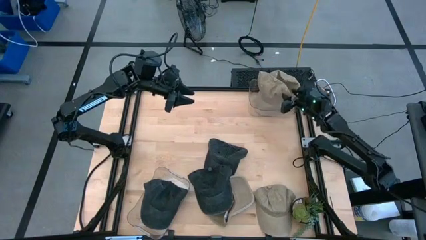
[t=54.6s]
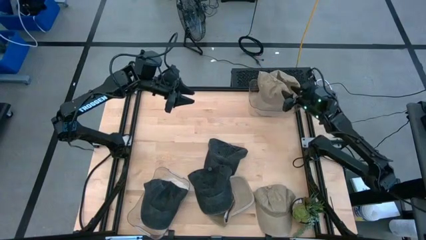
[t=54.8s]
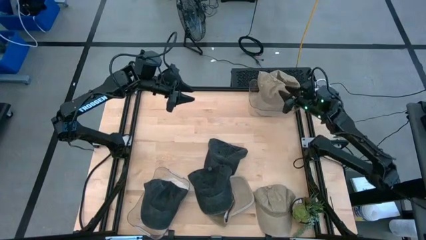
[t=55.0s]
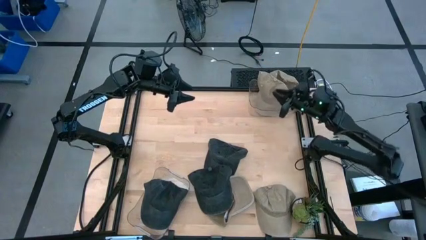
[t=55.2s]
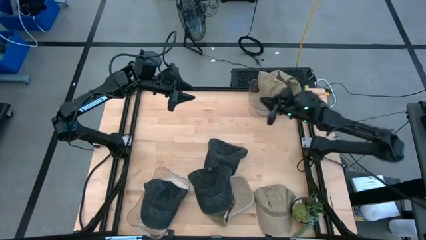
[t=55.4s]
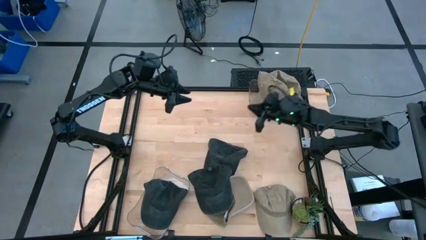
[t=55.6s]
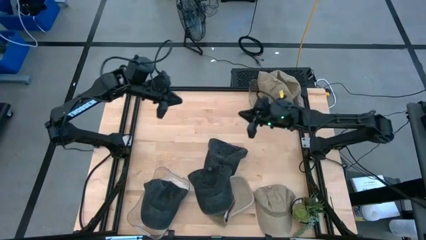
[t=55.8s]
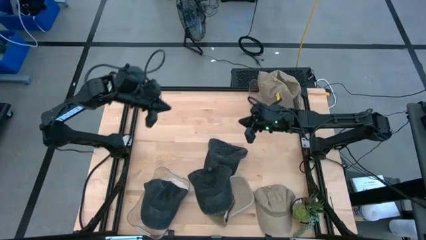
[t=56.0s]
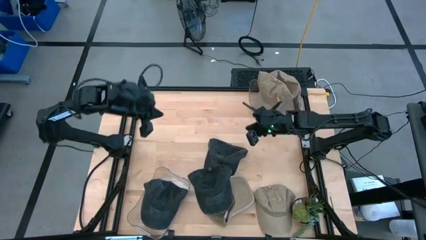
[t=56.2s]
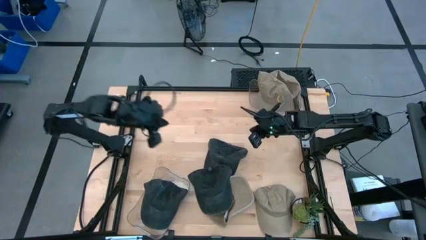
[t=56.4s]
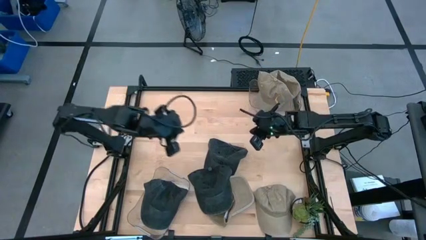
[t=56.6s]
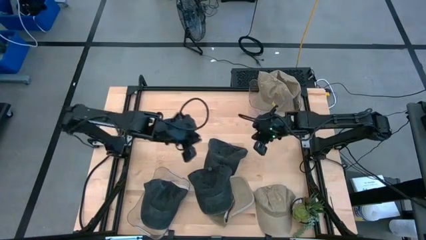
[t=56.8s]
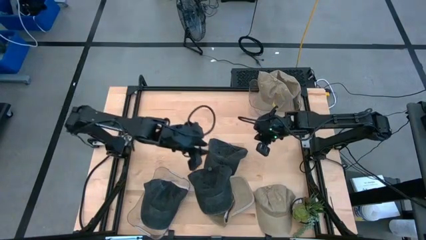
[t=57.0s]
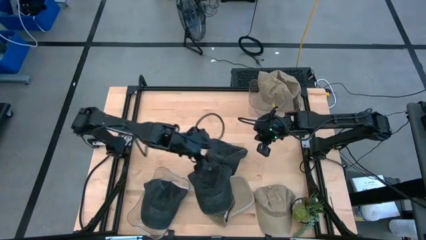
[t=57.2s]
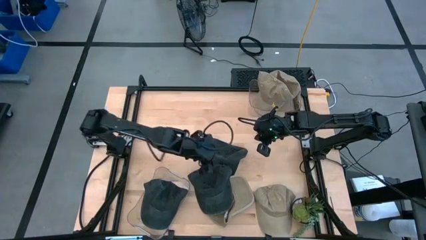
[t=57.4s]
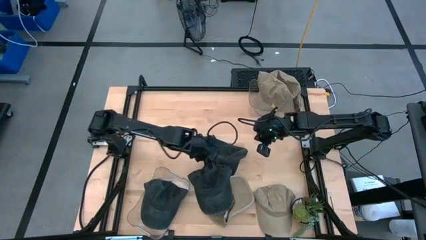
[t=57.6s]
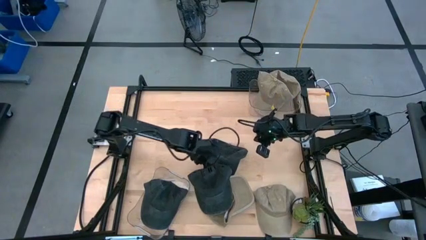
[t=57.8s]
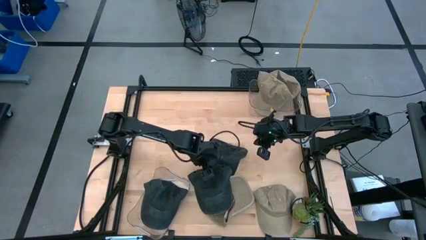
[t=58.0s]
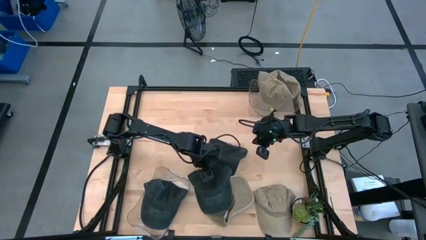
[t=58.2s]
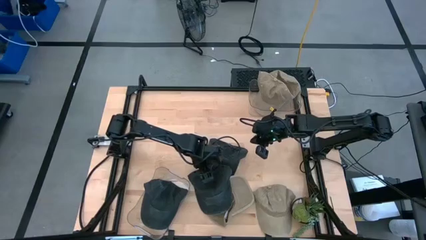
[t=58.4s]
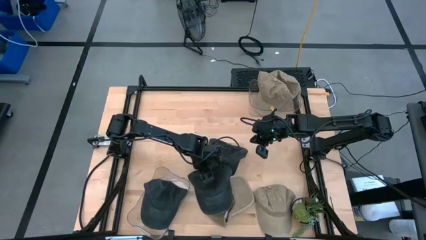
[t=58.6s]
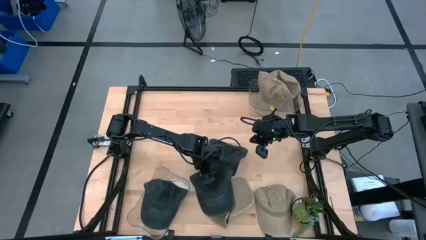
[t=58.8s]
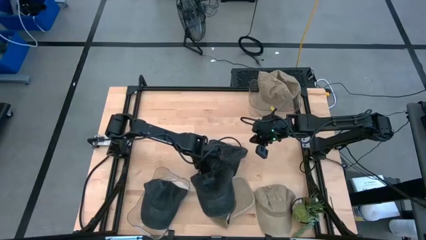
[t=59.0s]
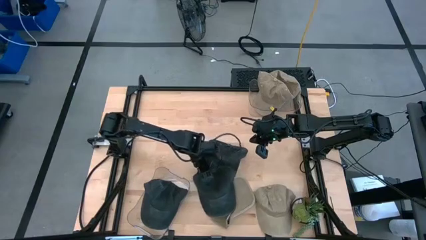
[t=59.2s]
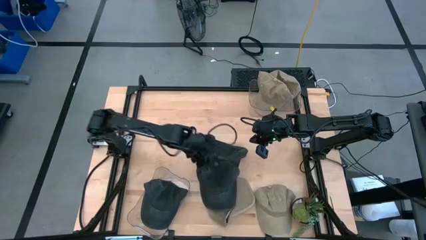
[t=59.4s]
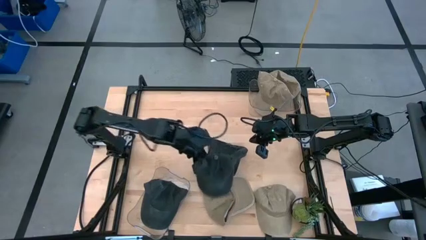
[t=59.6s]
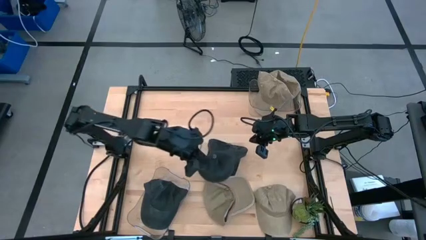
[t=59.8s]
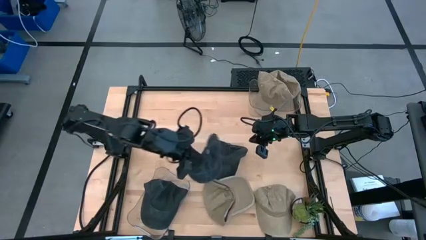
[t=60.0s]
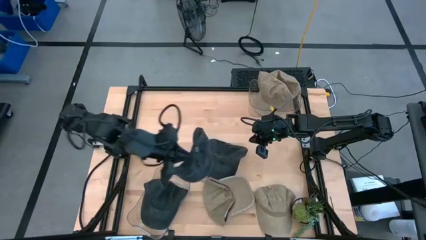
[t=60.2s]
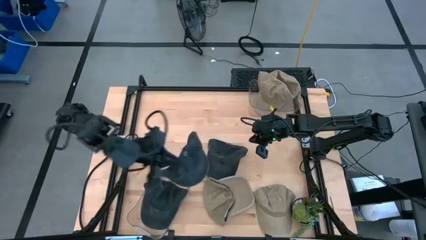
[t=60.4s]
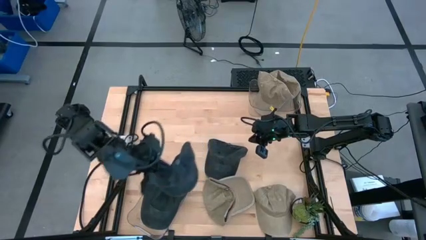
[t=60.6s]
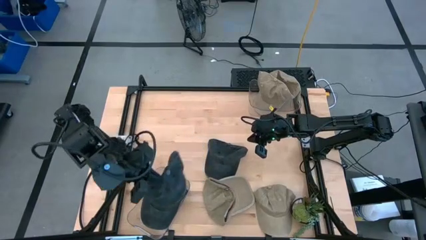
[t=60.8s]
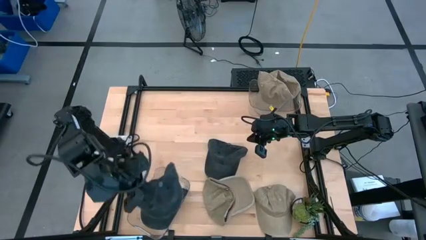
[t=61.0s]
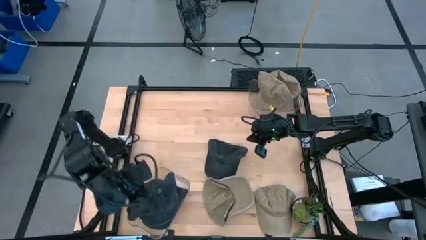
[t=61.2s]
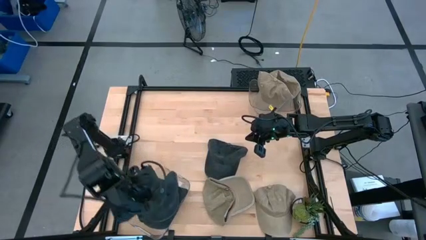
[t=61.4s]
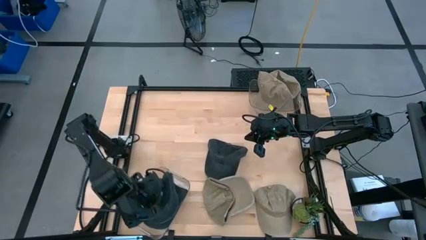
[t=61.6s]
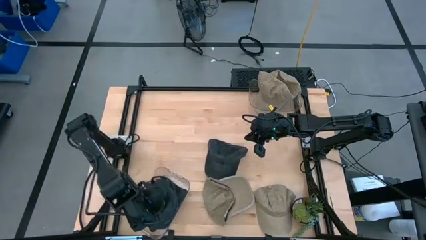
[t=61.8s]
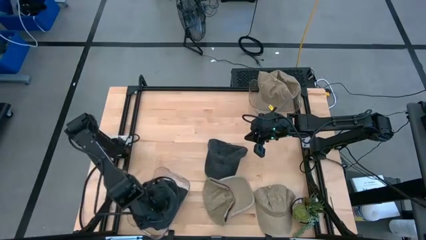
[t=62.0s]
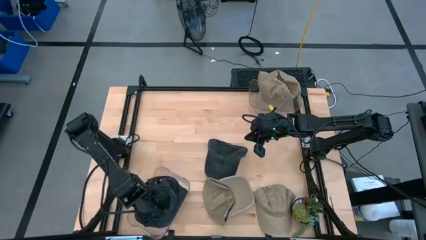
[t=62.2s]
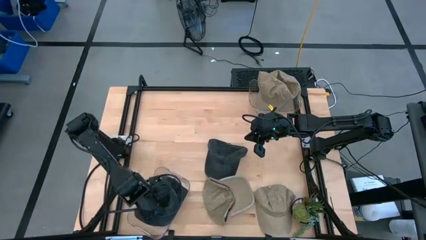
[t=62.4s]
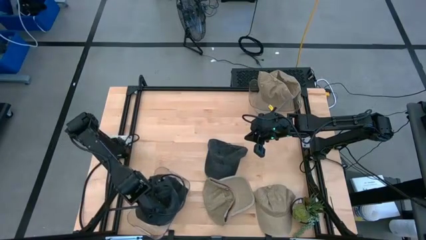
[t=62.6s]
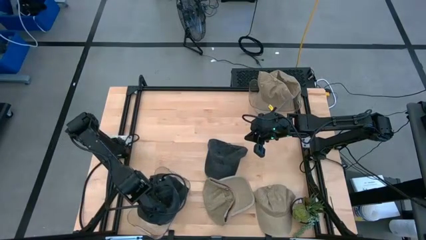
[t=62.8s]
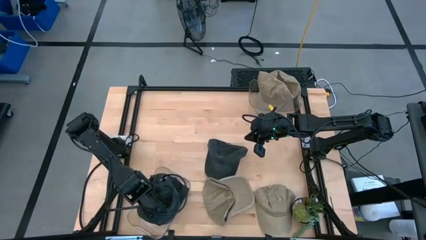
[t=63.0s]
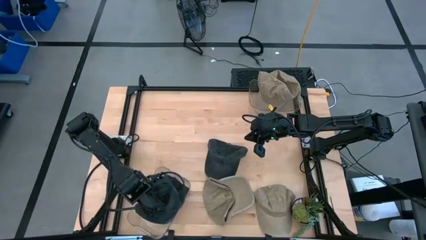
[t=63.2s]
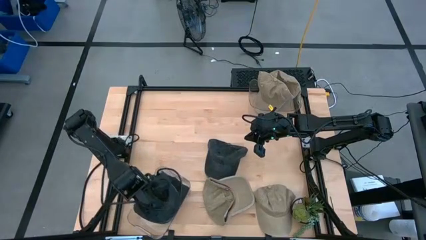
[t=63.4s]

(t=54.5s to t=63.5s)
Task: Pick & Place hat
Put the black cap into the bottom transparent bin

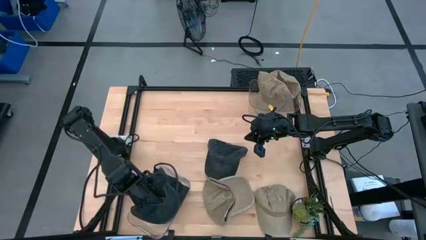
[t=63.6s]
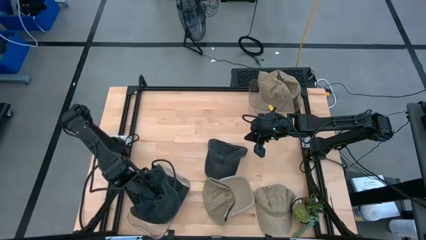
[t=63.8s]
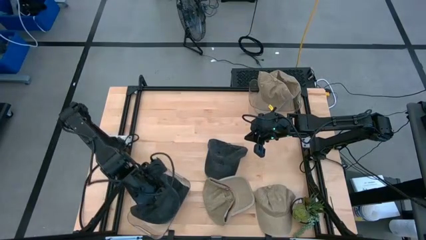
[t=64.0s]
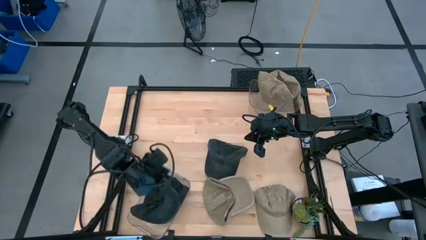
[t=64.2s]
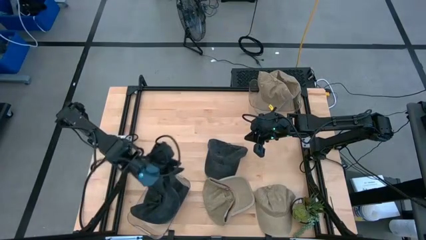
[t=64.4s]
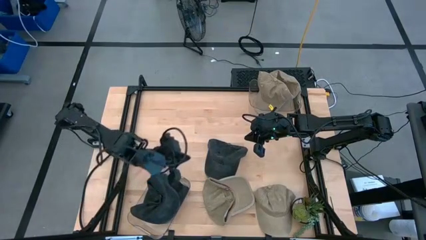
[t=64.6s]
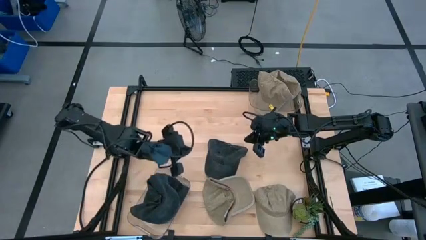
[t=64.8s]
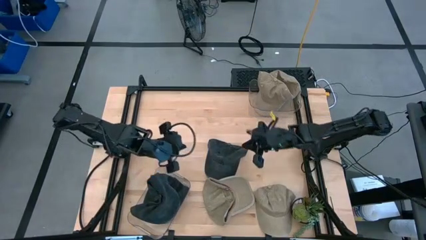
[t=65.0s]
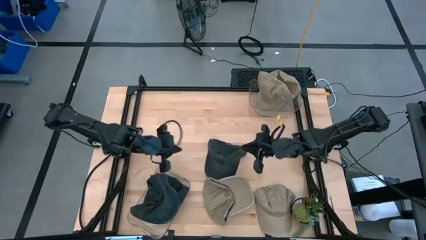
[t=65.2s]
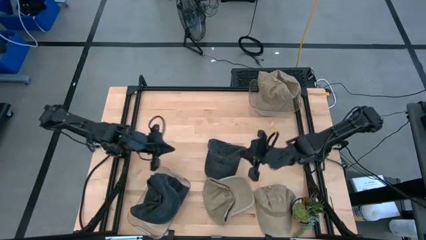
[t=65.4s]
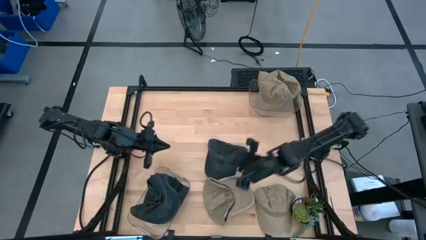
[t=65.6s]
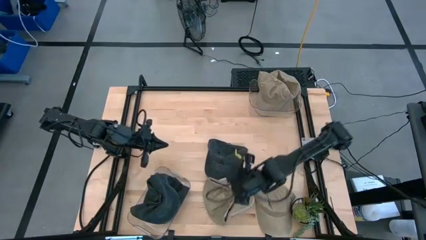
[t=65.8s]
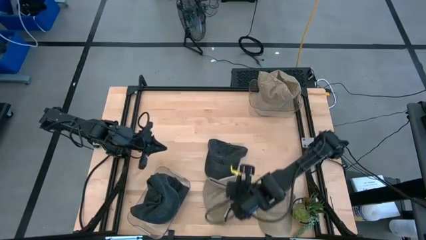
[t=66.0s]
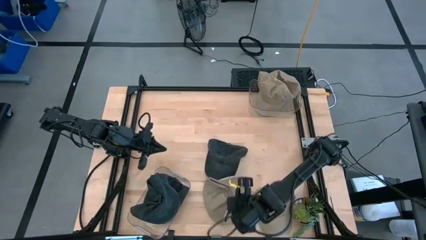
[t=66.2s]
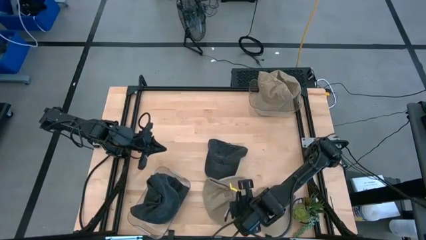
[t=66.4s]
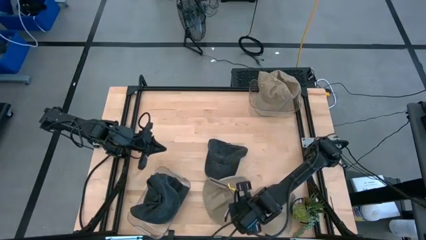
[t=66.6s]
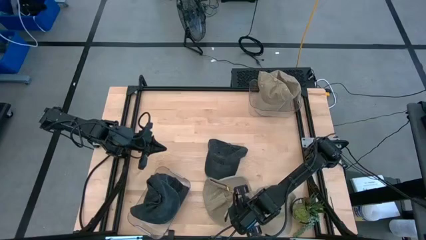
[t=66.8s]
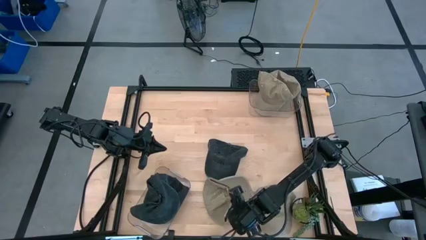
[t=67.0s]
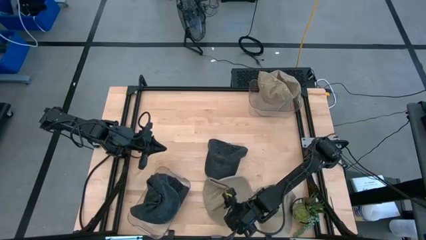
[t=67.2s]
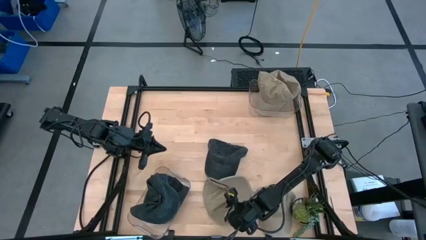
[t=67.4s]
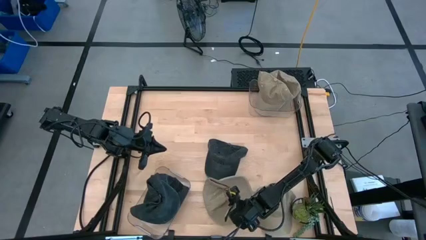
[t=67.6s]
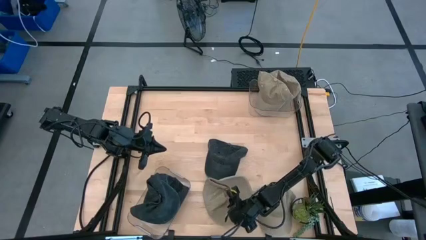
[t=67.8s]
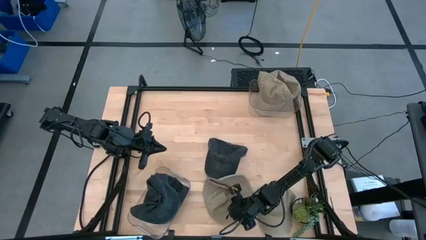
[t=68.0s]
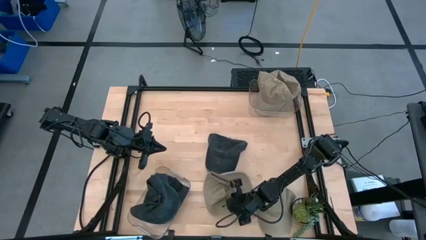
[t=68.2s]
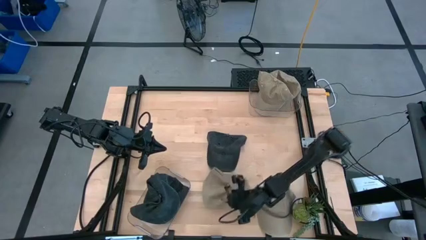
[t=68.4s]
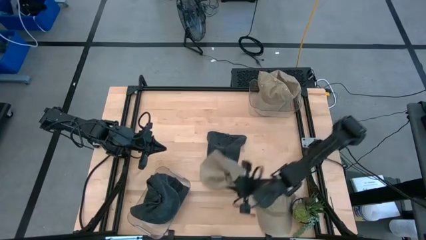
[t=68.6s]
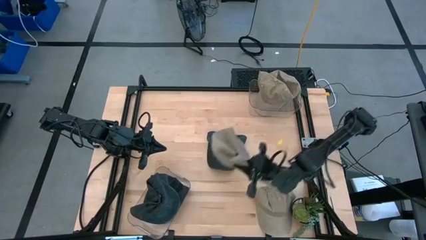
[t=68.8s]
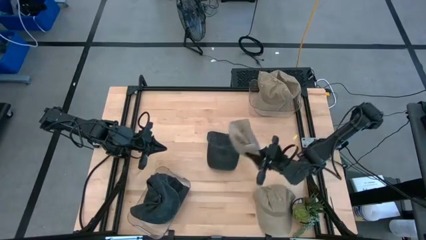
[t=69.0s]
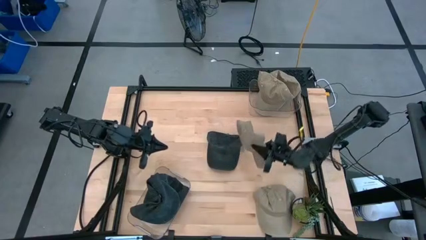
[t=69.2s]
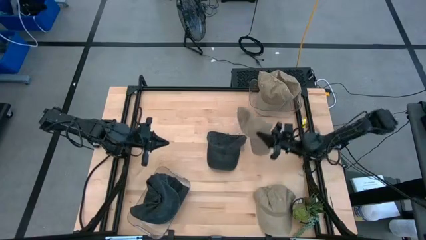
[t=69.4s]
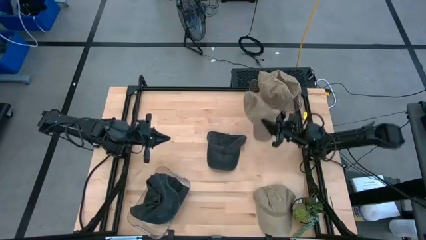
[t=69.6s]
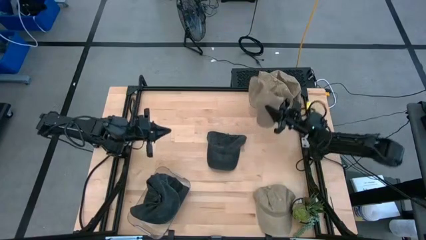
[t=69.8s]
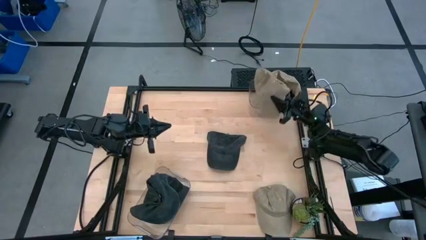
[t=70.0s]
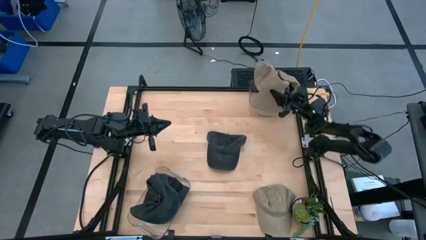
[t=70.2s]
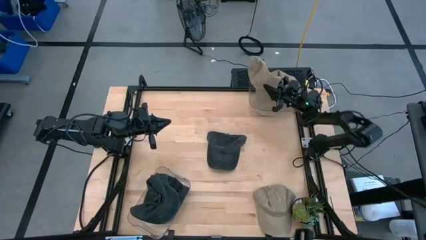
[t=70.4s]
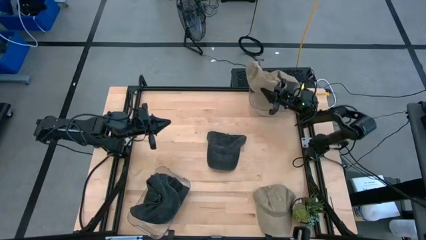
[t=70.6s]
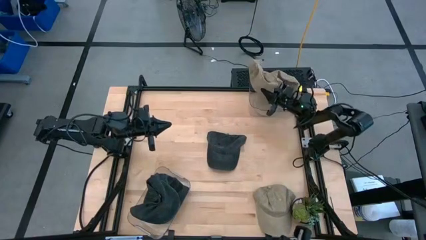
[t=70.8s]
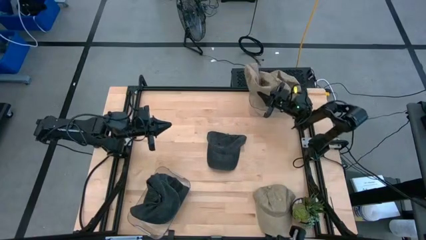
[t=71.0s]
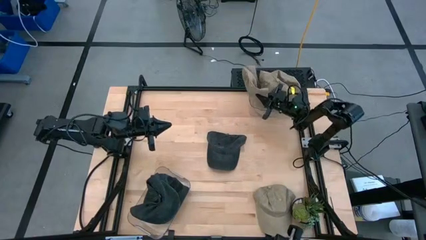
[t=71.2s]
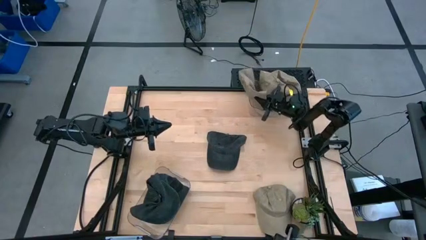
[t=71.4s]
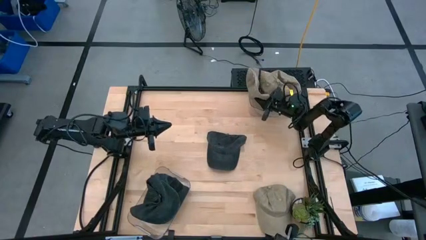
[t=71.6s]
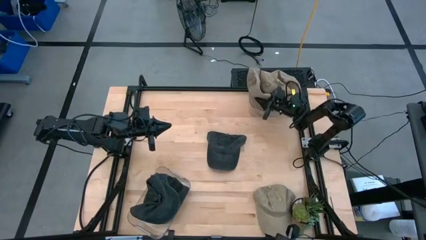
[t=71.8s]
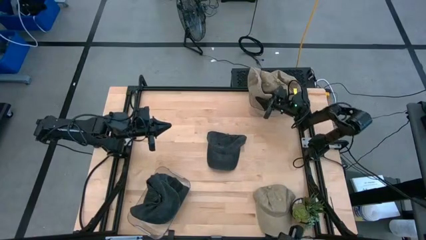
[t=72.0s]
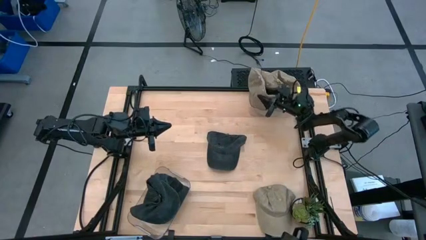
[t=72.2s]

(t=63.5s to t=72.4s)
Put the brown cap into the top transparent bin
